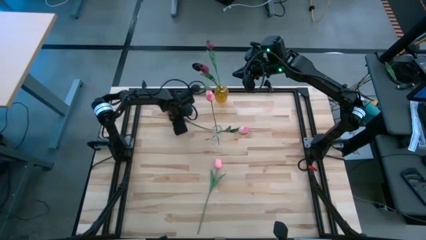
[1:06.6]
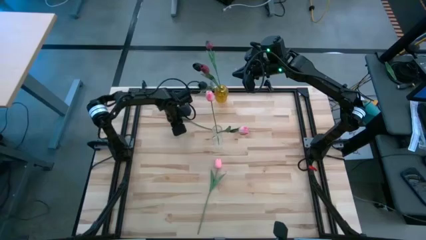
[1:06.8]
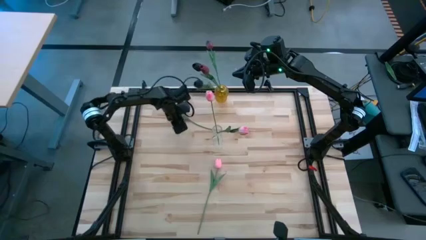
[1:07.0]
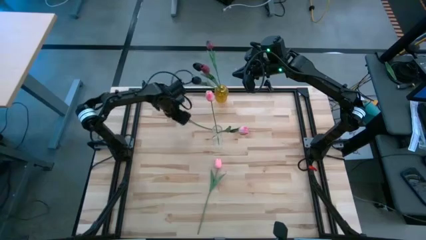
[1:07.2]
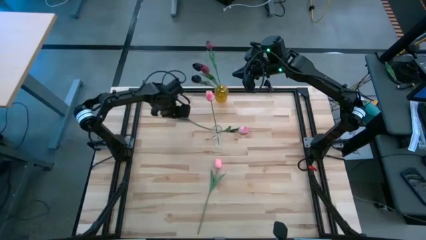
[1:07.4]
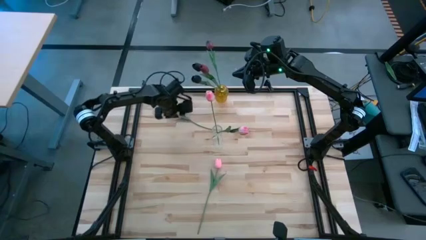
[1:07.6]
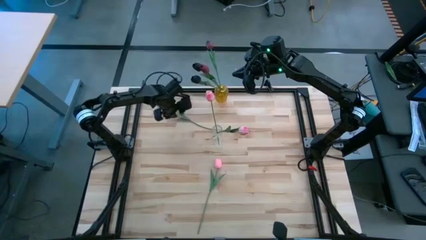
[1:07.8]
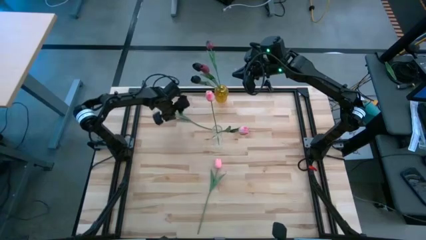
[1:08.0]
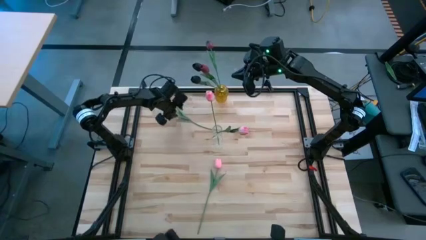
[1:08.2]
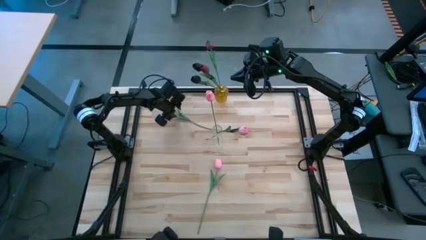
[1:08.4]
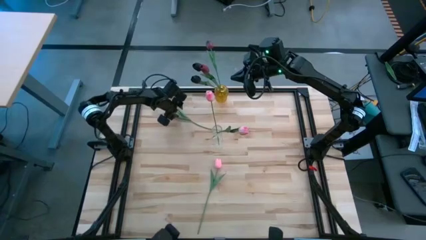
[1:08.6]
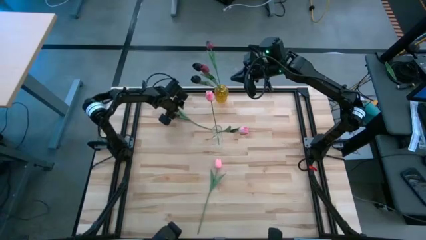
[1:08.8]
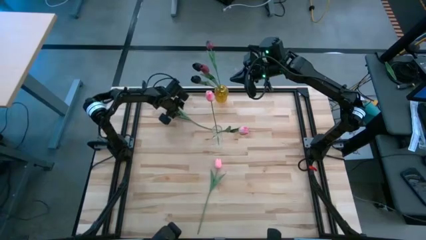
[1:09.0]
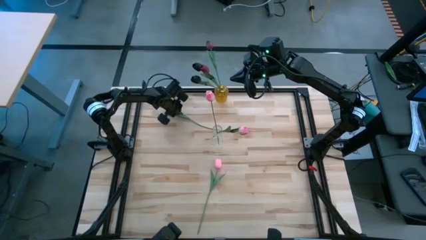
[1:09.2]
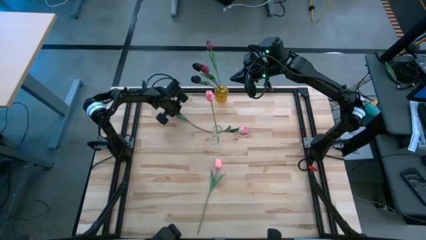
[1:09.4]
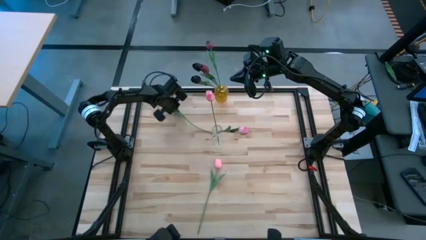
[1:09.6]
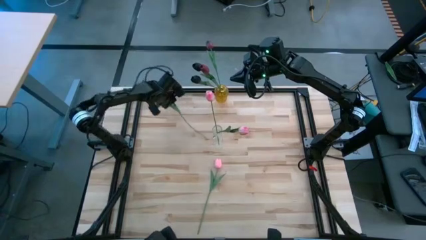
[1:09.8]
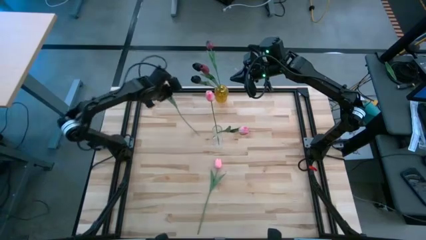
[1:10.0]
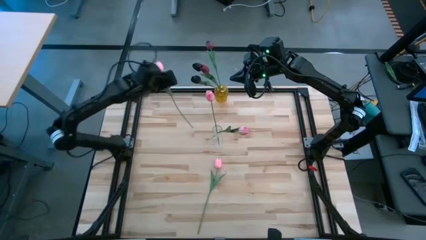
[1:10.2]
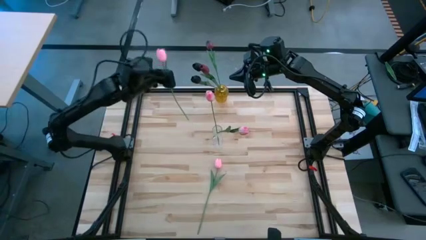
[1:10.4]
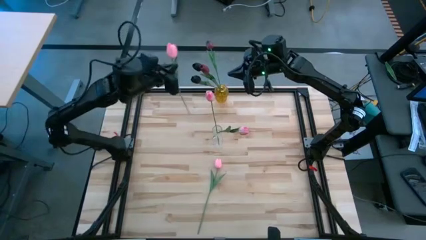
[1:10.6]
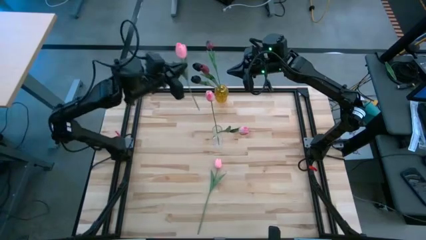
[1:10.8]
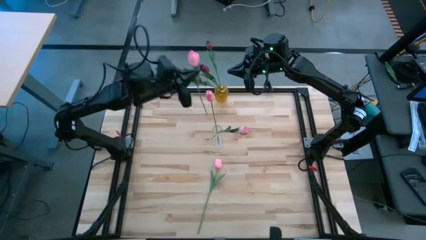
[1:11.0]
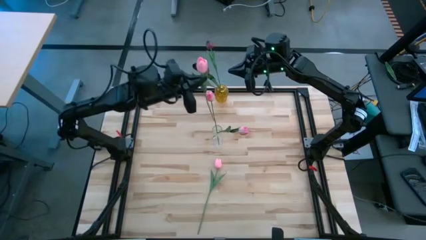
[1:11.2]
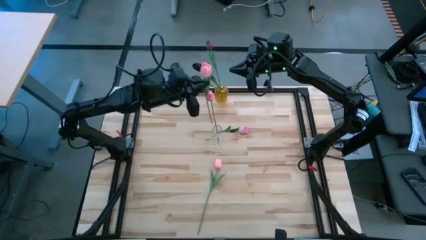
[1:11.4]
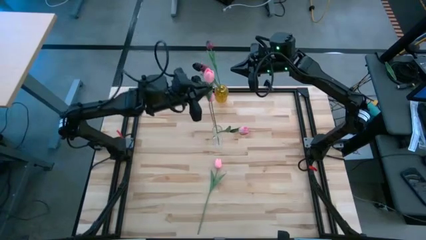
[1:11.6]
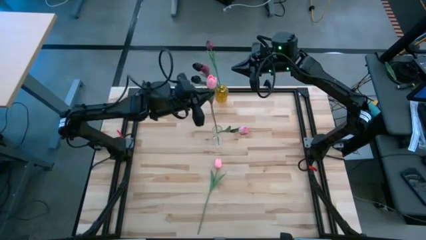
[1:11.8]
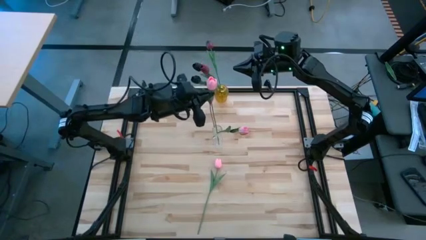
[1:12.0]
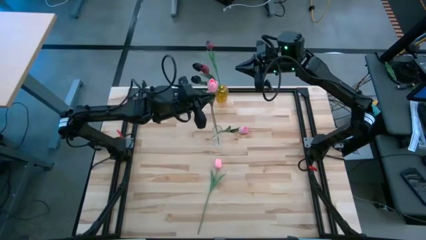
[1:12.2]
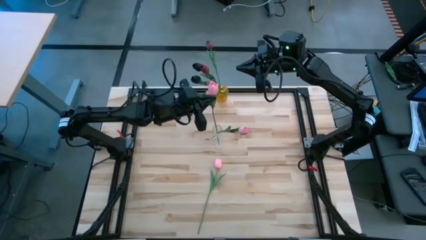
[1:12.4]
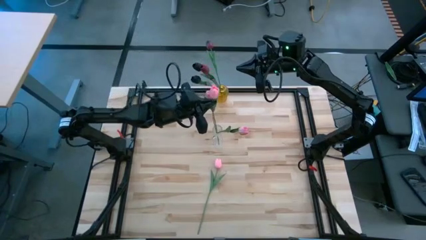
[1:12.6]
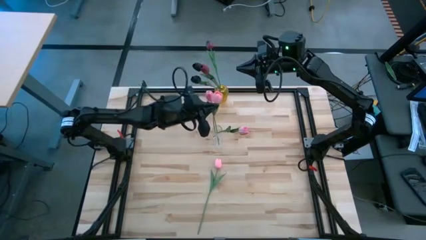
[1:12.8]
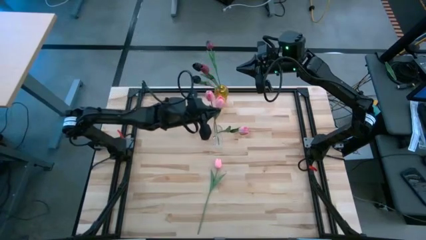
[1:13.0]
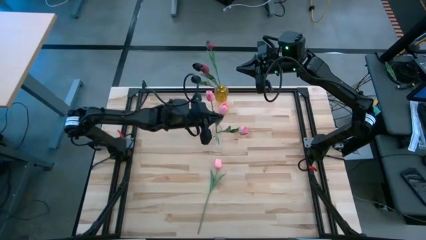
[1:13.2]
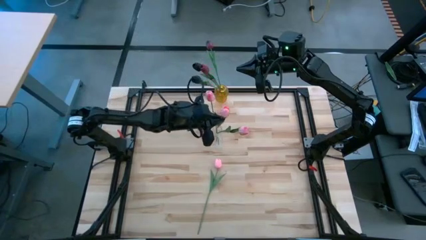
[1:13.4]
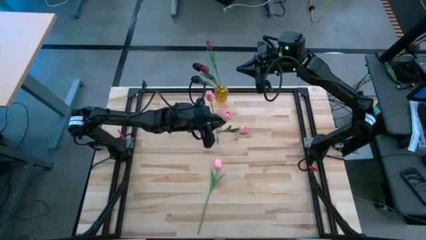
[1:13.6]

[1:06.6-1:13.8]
Task: Sort flowers into vase by color
Put the pink flower into the transparent vase

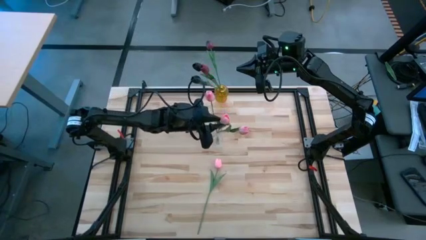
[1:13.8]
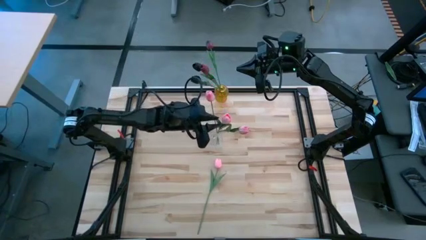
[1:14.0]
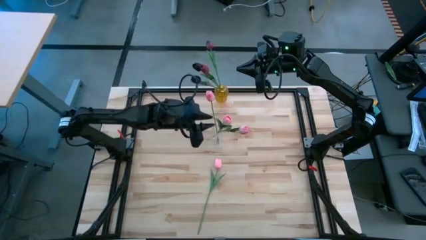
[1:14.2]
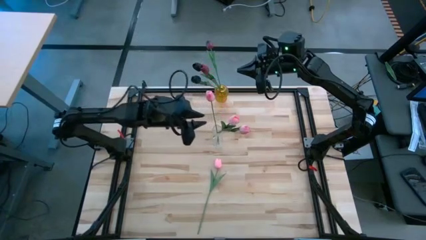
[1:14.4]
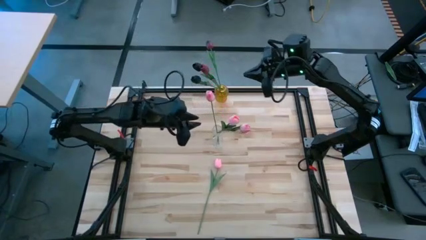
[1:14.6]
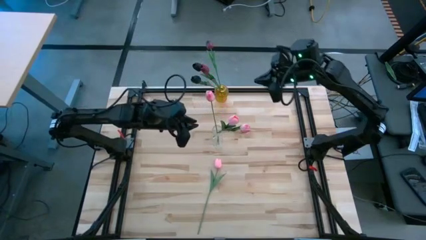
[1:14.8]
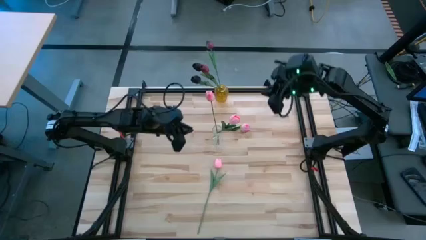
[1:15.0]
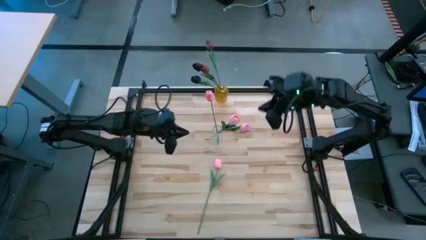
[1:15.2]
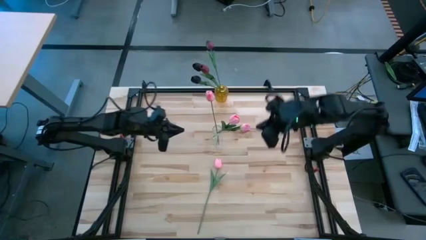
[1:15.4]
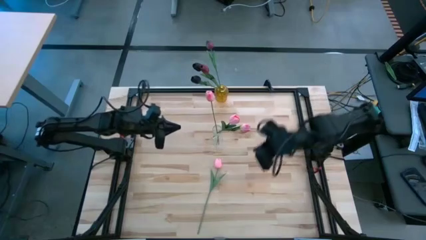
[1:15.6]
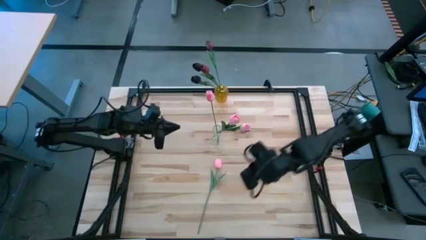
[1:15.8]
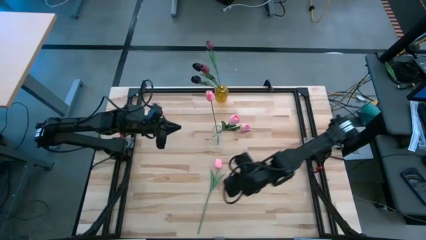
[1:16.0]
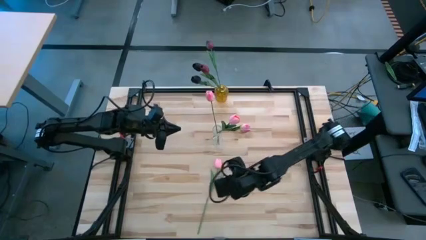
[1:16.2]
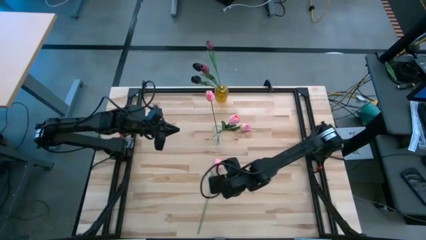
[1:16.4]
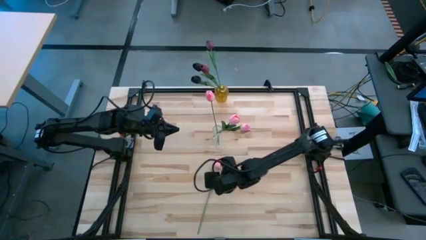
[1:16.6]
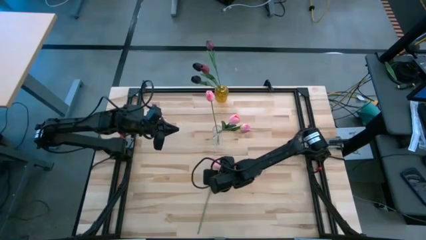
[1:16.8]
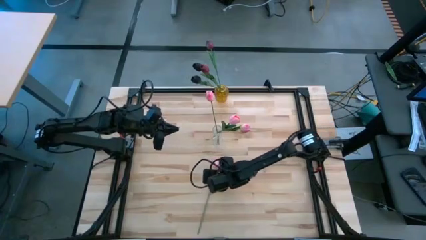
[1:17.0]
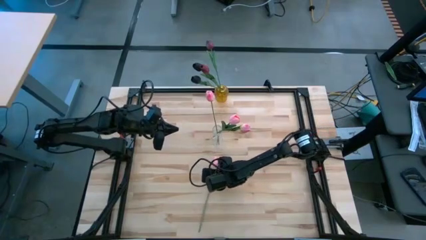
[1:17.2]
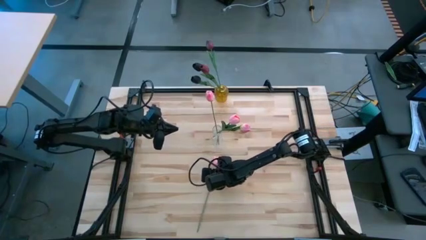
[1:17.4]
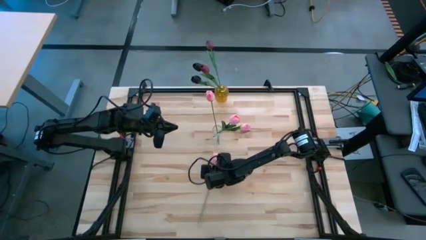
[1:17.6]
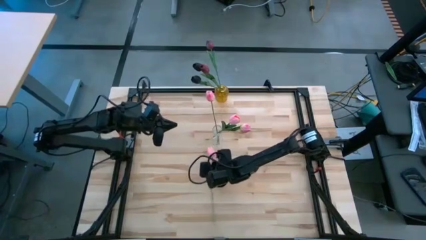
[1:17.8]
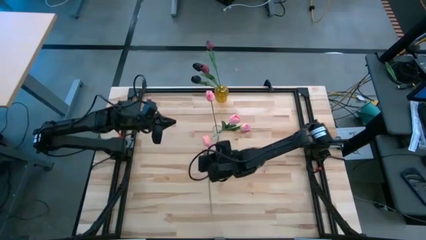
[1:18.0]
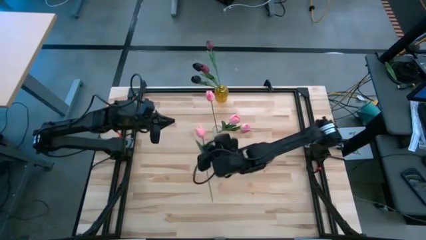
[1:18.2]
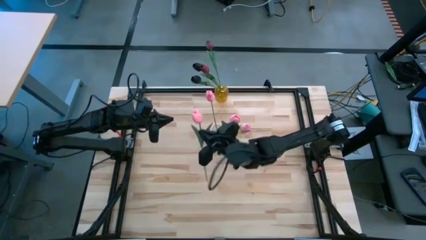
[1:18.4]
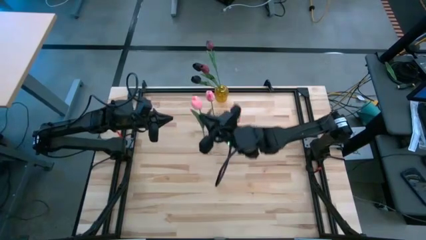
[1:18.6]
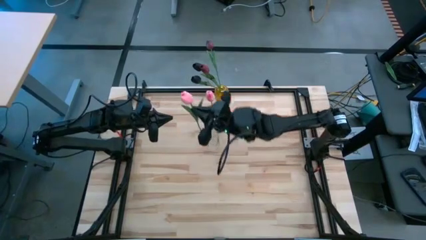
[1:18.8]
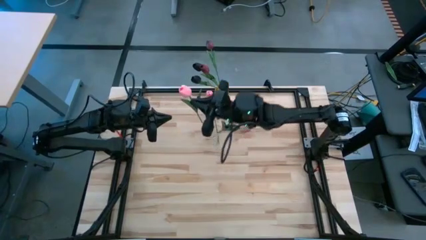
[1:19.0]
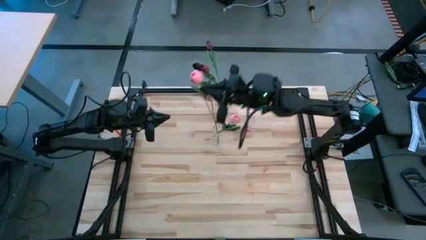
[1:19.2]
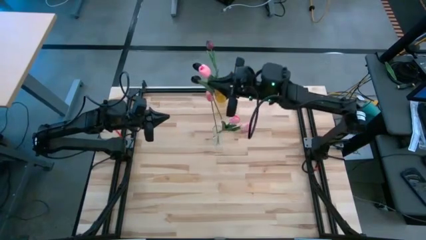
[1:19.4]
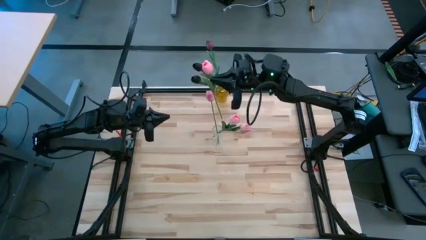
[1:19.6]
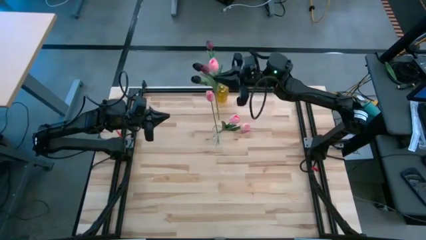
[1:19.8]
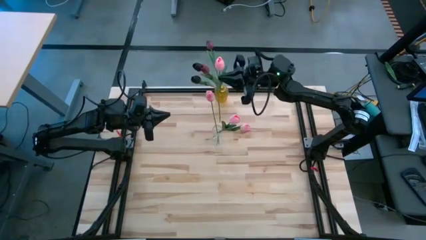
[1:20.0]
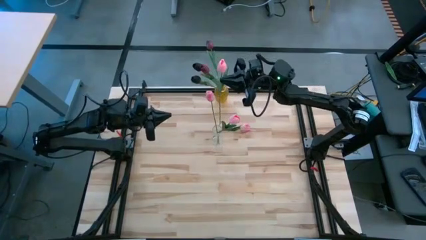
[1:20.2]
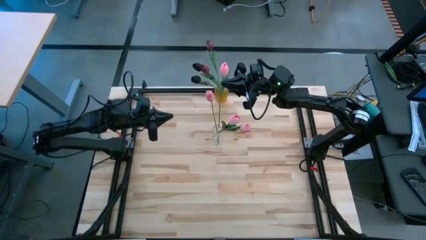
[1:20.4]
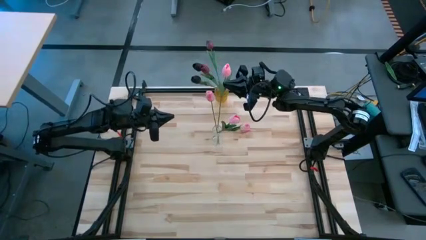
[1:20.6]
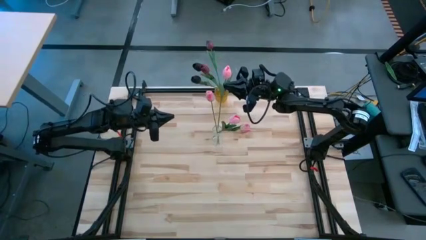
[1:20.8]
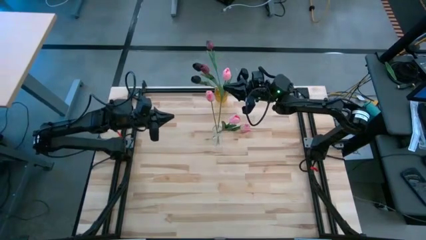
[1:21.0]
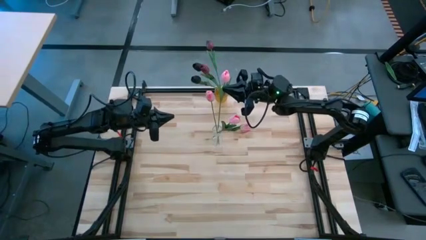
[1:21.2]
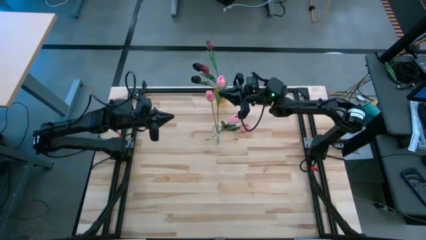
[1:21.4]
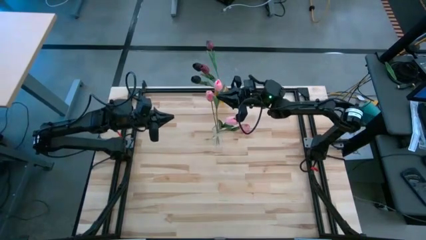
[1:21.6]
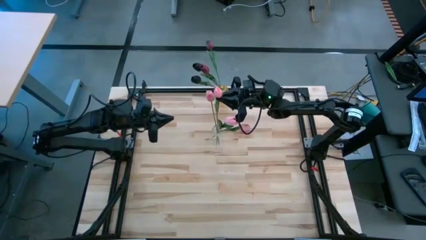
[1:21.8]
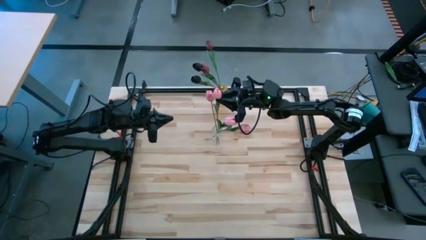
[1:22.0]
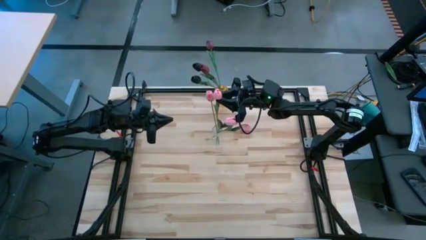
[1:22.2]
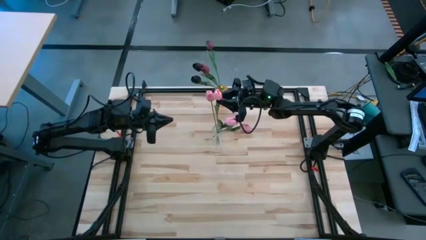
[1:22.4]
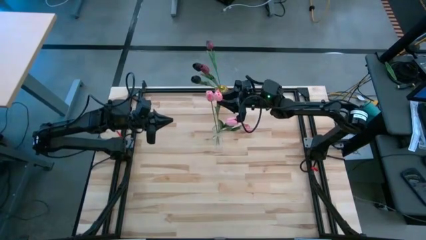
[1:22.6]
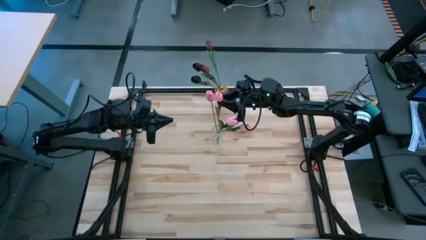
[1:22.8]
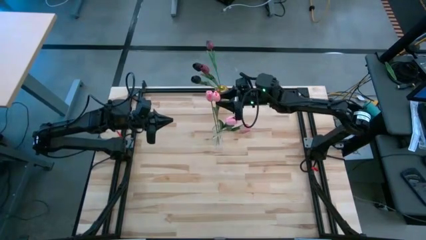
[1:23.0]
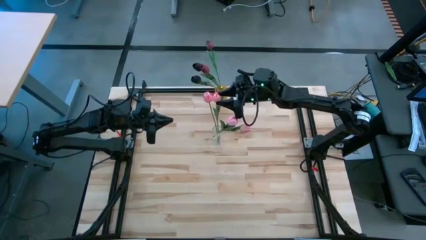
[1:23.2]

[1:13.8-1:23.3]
Put the pink flower into the transparent vase
